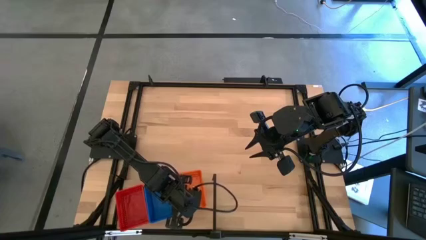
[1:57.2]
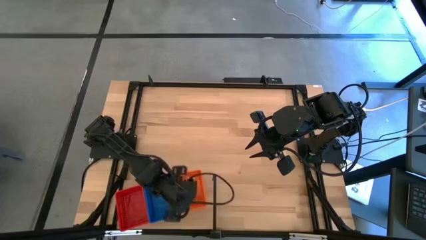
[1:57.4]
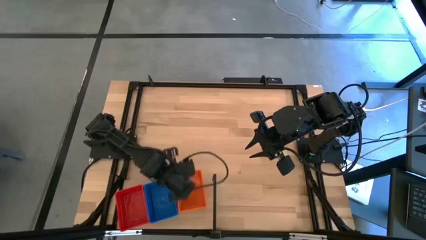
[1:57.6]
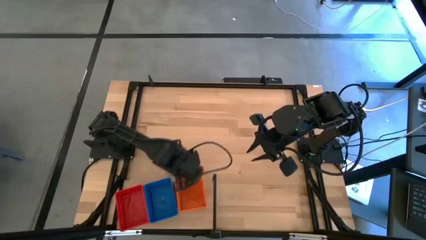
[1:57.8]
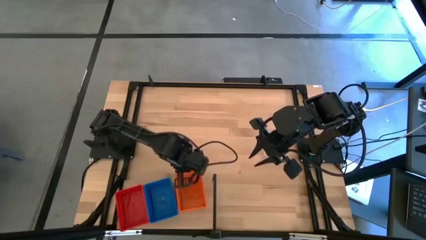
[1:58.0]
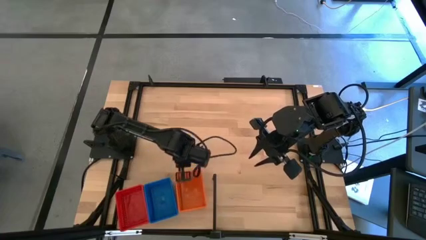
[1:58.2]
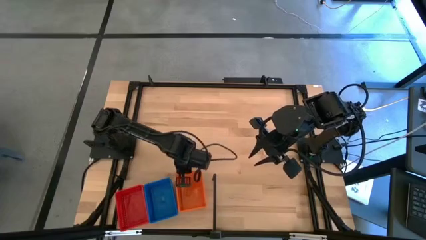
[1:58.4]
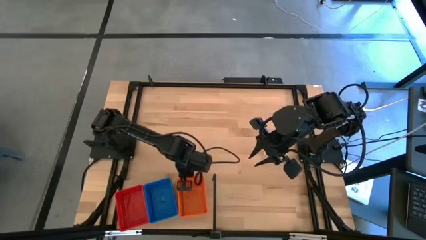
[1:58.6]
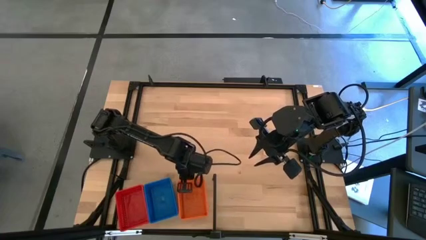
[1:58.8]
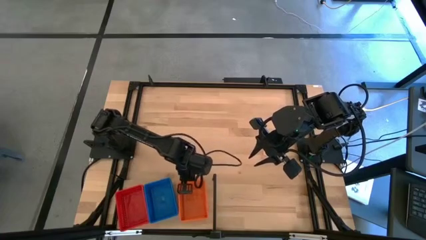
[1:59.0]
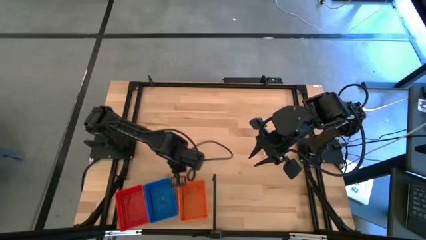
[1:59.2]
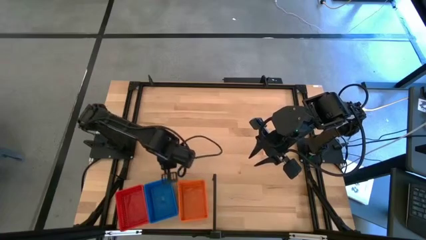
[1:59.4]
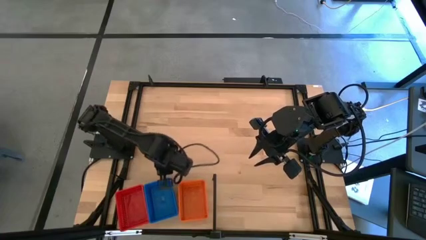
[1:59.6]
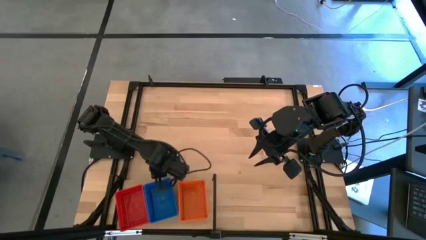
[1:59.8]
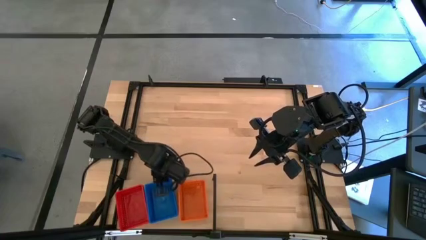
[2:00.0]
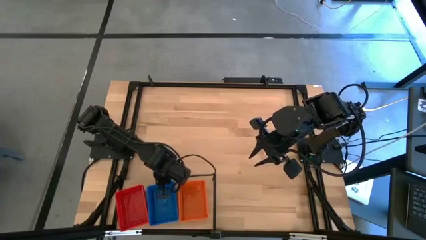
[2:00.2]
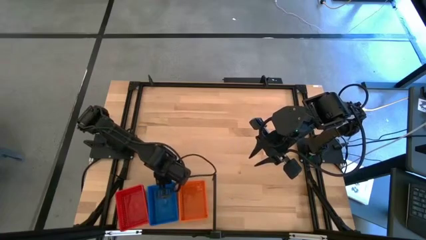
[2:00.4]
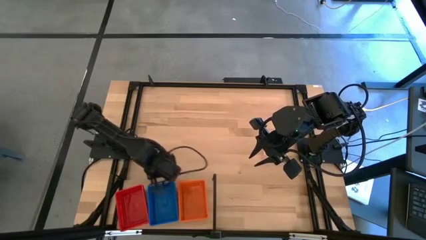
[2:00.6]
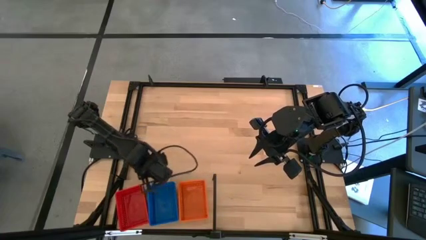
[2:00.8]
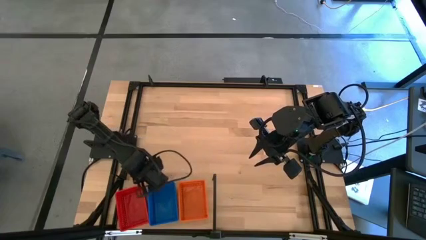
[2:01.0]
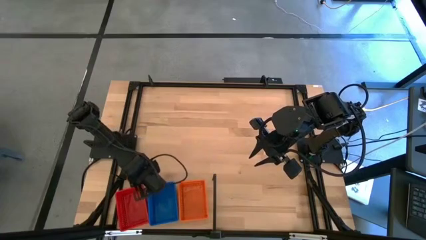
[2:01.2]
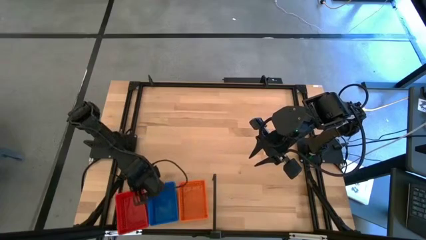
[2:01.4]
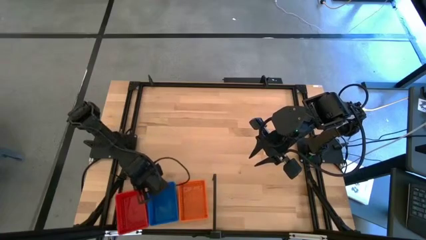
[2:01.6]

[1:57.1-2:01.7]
Task: Stack baskets on shelf by color
Adjust the stacked bins on the shelf

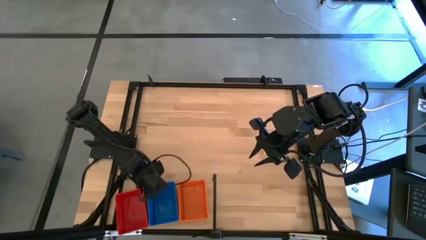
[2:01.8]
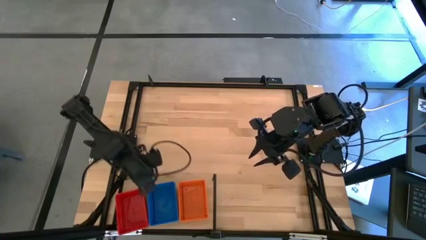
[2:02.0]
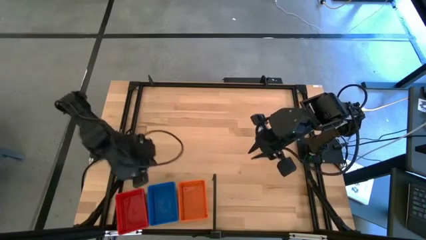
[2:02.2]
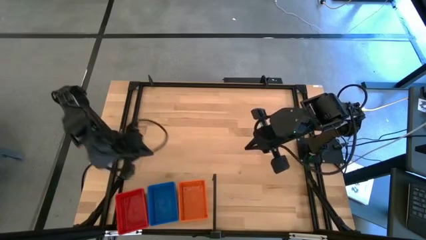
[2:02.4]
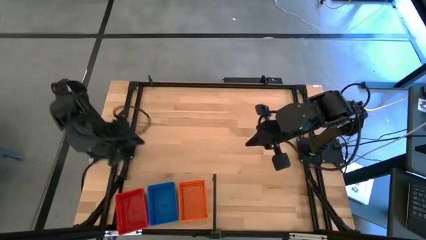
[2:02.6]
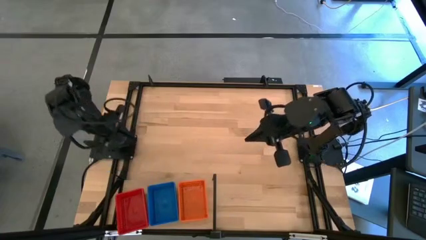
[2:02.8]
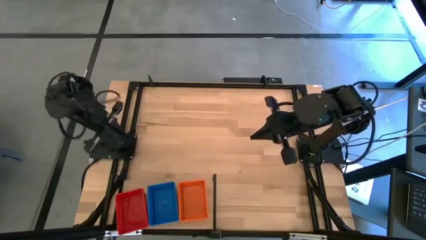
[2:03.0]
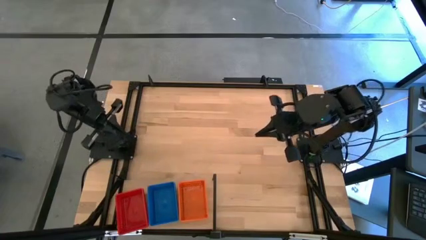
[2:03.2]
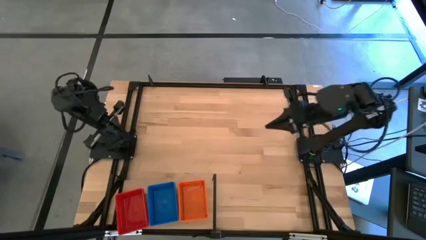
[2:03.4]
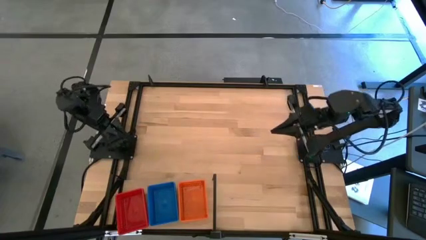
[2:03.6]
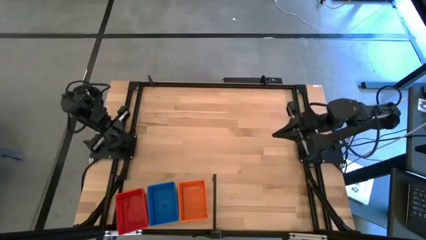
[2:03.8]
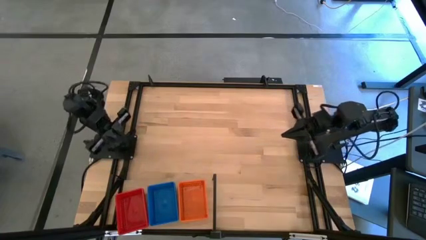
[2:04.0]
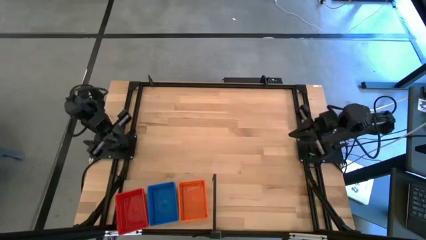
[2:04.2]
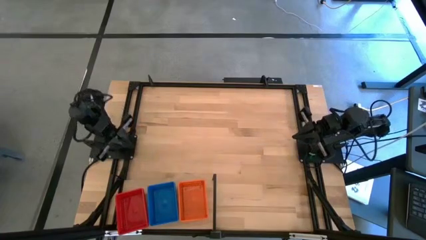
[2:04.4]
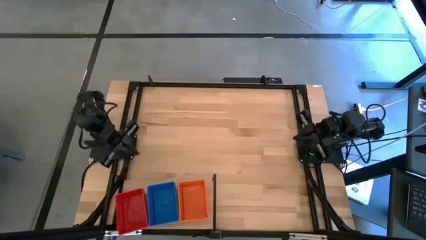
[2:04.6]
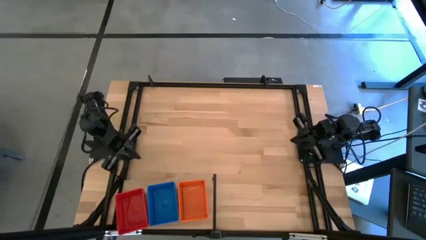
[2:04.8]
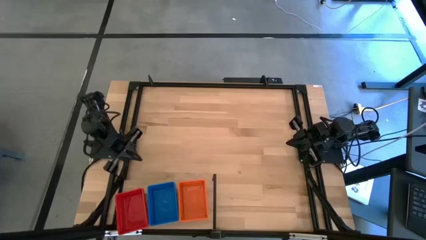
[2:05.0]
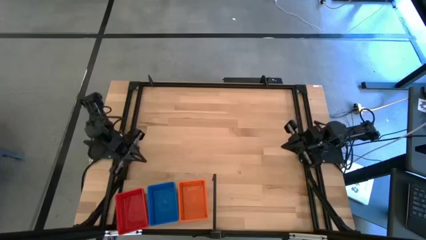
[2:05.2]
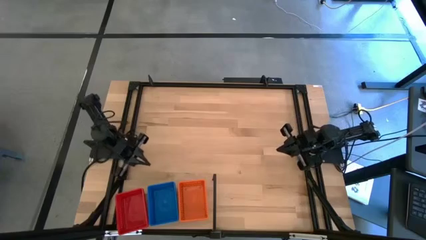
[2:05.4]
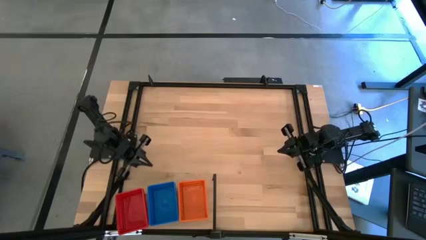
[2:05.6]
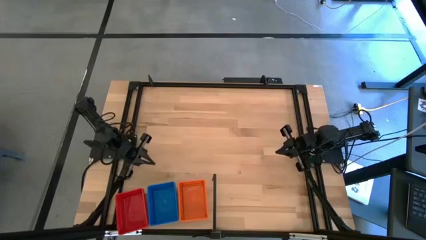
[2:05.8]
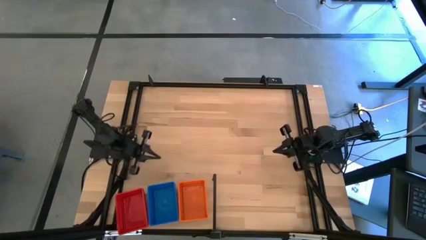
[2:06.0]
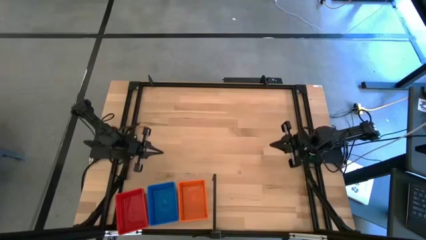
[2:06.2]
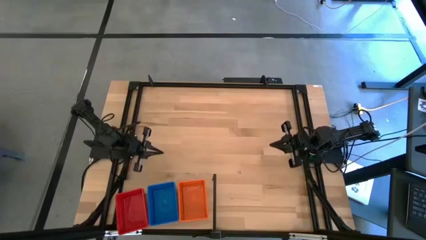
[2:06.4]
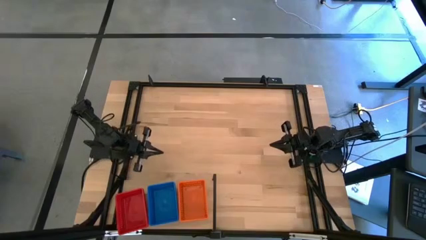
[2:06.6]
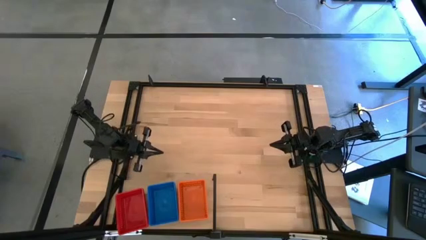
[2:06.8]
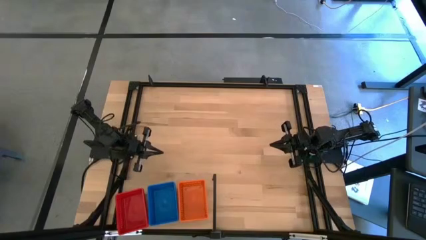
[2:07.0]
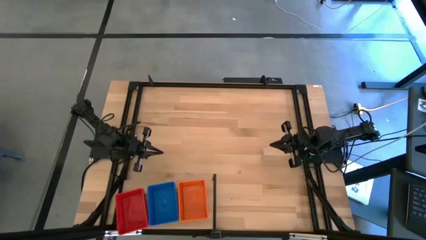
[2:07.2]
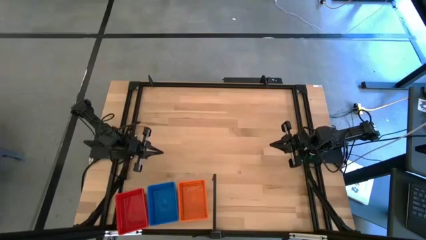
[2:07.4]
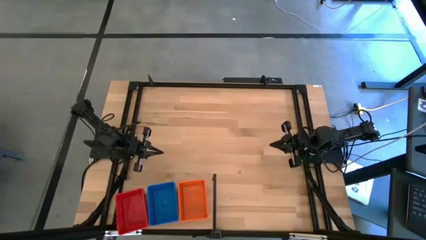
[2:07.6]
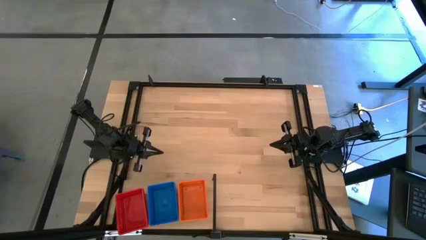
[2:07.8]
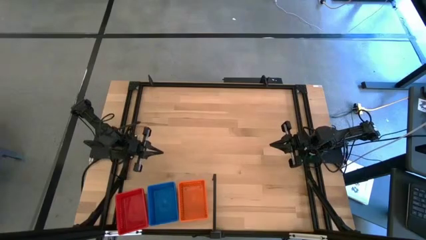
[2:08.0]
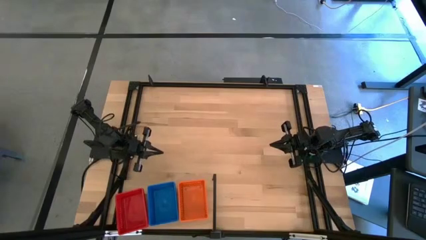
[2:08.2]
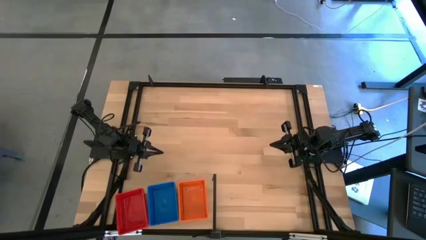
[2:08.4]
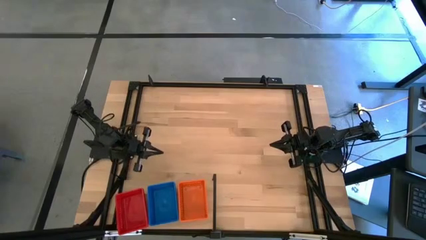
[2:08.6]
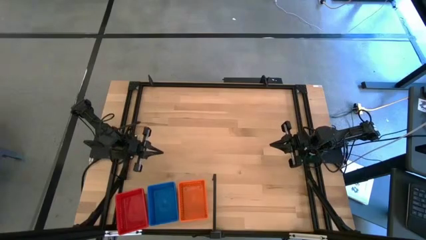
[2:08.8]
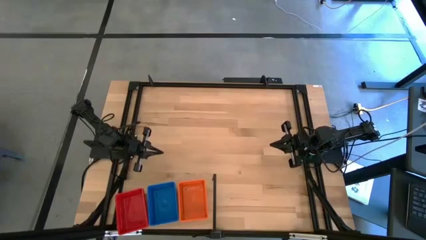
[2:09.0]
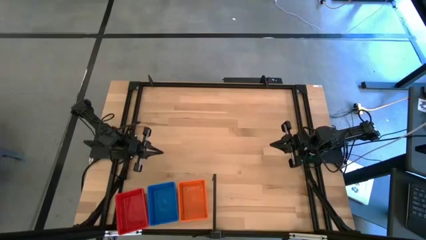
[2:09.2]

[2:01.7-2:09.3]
Return to Home Position
